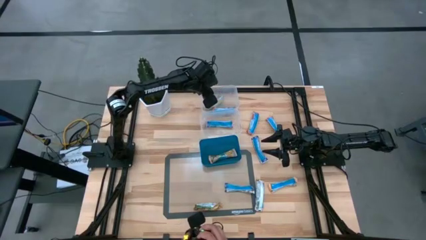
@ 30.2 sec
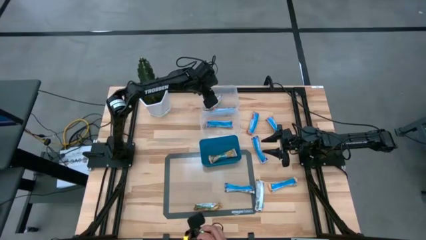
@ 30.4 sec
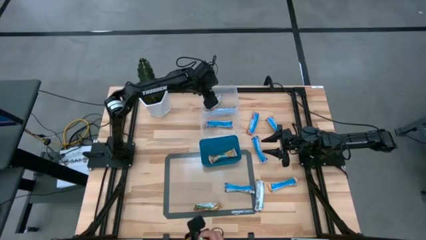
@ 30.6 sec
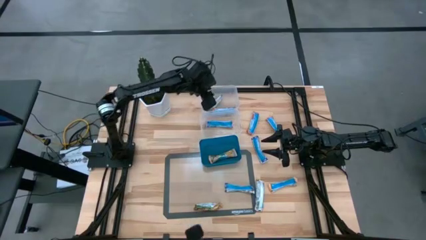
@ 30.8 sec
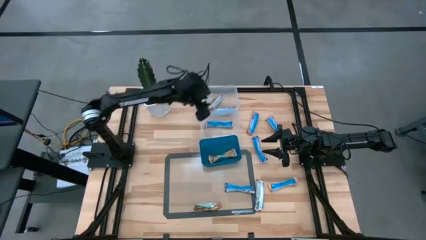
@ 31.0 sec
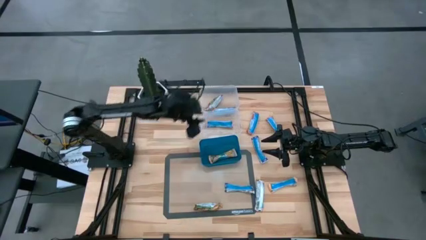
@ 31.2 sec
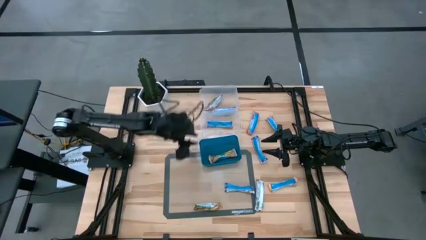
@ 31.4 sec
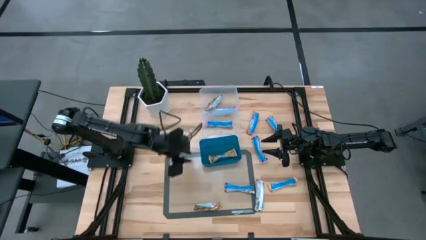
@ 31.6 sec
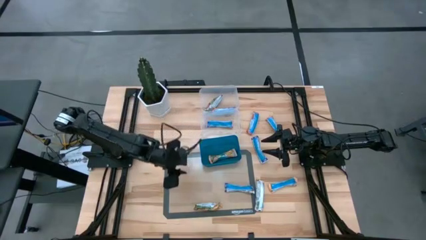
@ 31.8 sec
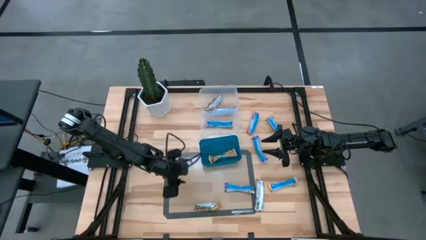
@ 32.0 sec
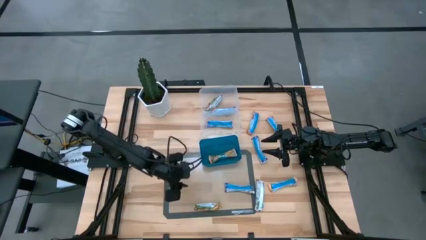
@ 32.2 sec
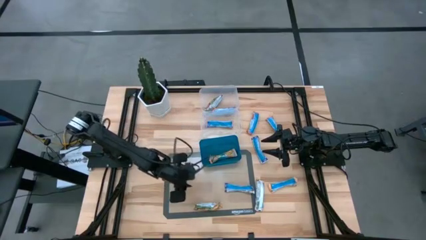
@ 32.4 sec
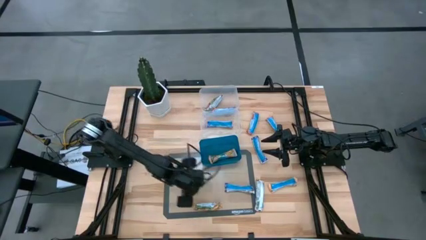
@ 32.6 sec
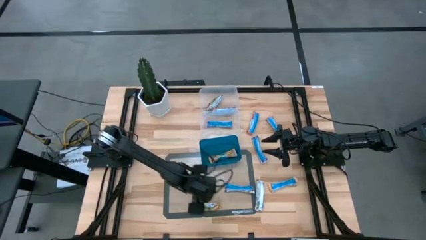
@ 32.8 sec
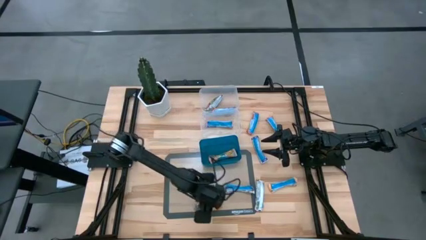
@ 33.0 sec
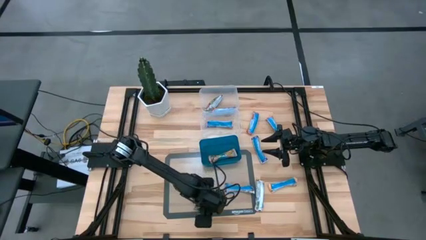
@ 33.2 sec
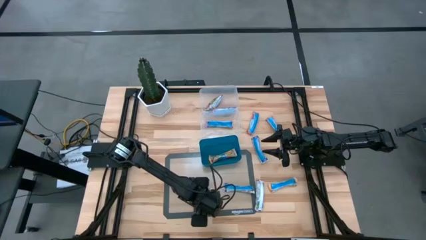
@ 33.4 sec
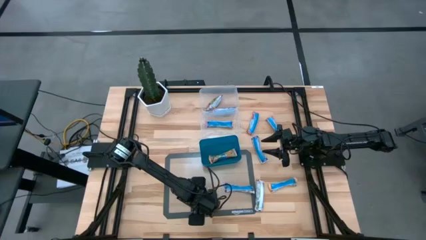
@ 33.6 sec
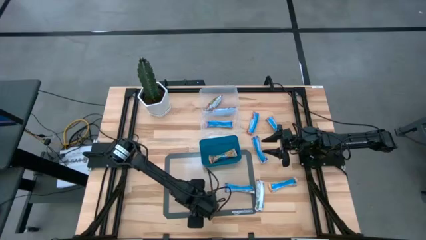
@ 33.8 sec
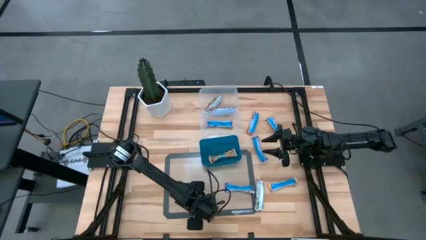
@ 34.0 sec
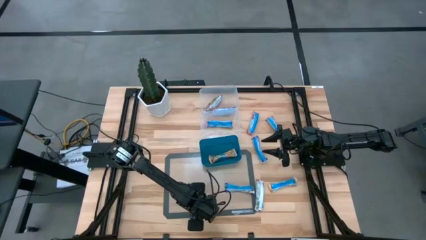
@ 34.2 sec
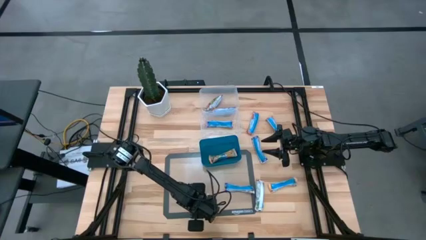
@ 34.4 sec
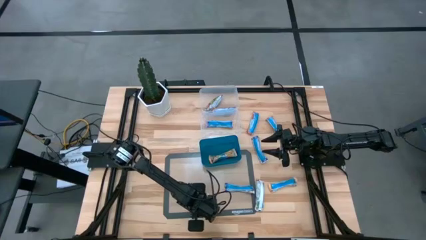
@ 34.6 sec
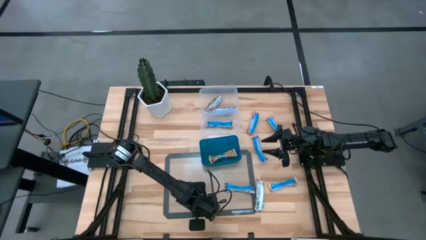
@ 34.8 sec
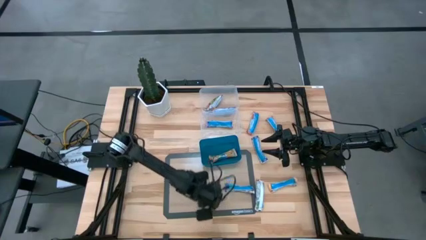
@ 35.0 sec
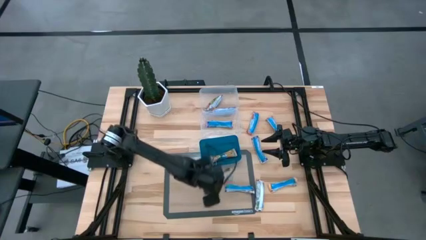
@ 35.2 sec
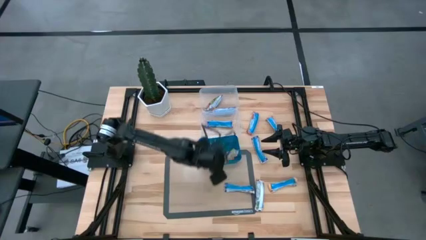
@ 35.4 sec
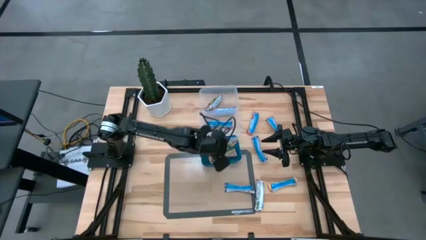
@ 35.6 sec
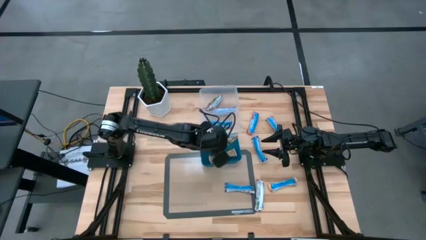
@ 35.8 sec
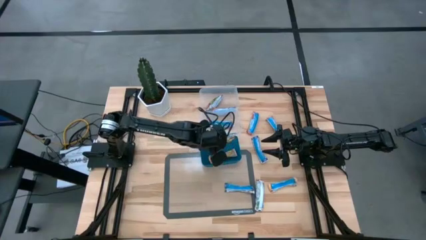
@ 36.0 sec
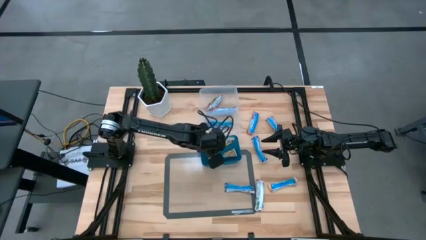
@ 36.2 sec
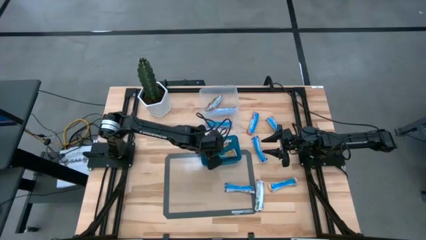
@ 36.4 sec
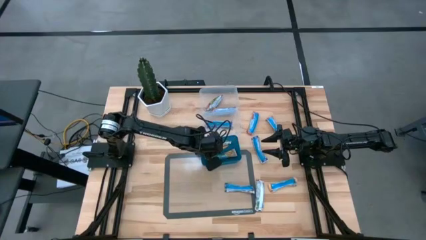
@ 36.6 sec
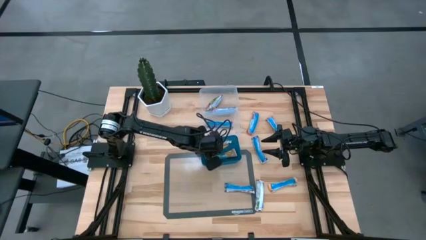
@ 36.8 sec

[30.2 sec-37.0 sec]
Task: Pick and place Granola Bars by type
Put the yellow granola bar into the top transparent bin

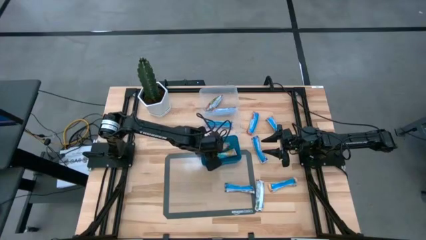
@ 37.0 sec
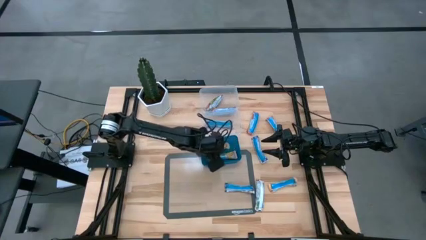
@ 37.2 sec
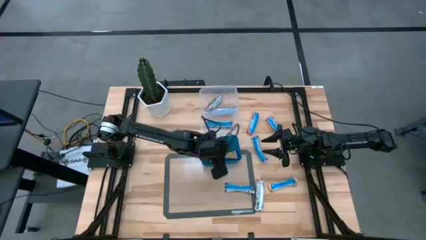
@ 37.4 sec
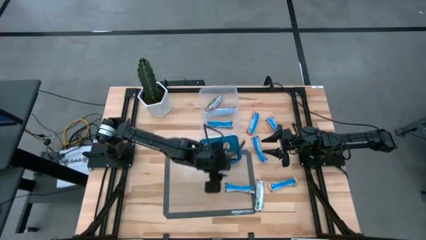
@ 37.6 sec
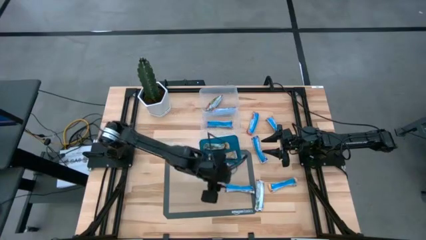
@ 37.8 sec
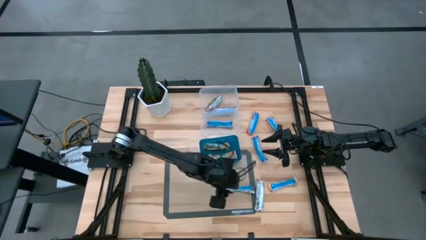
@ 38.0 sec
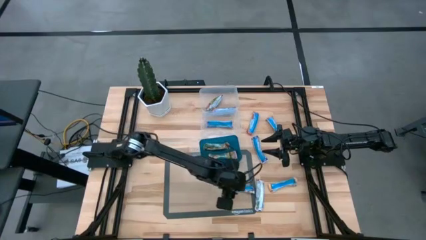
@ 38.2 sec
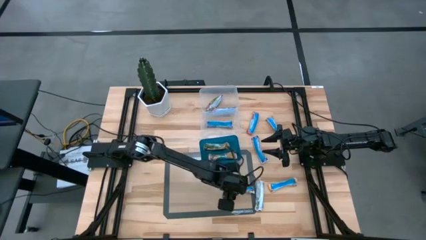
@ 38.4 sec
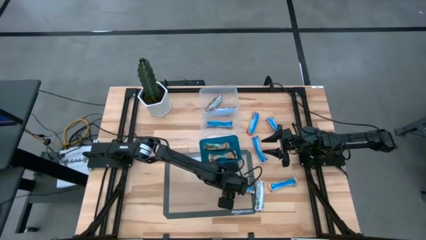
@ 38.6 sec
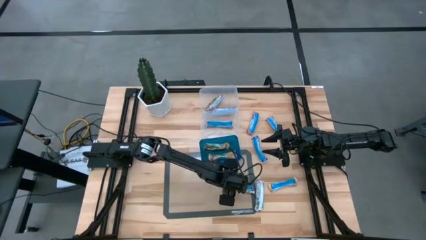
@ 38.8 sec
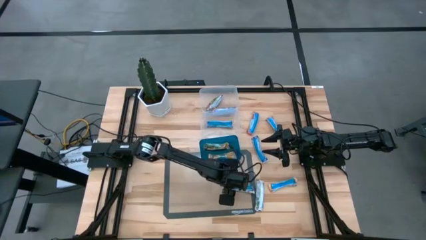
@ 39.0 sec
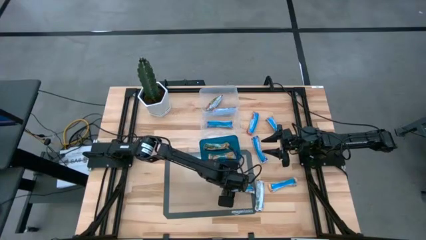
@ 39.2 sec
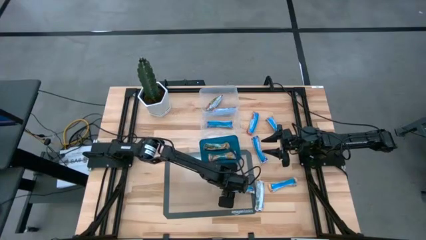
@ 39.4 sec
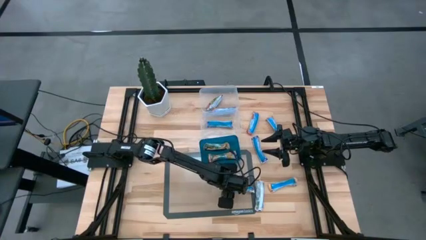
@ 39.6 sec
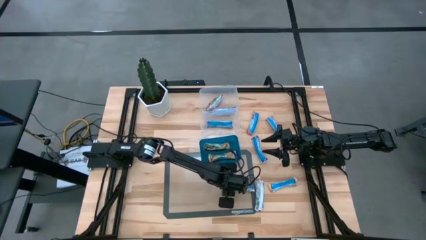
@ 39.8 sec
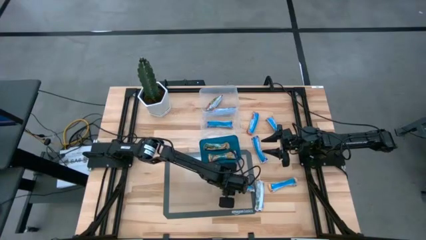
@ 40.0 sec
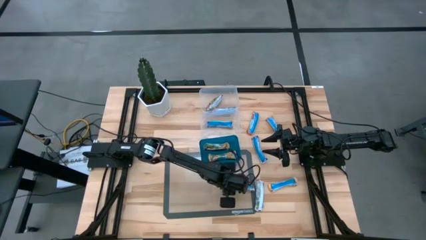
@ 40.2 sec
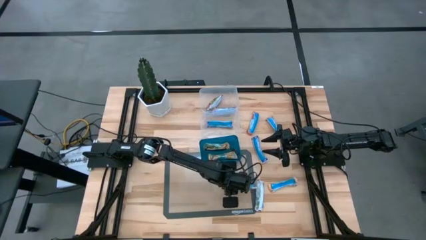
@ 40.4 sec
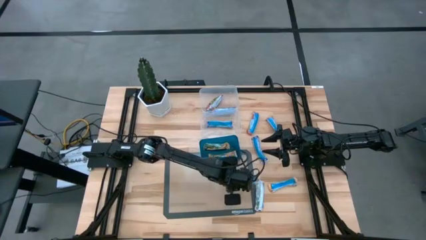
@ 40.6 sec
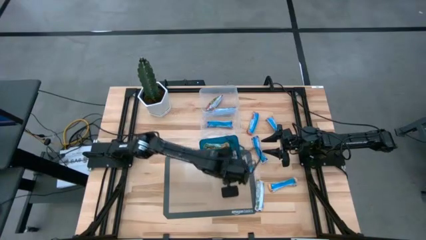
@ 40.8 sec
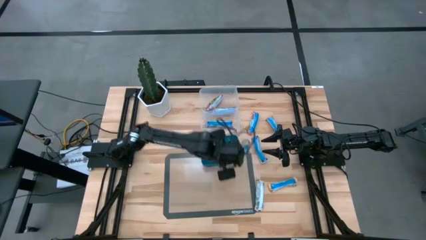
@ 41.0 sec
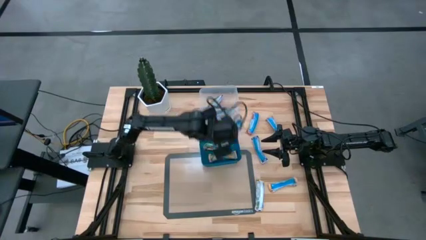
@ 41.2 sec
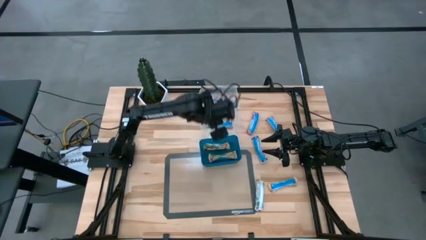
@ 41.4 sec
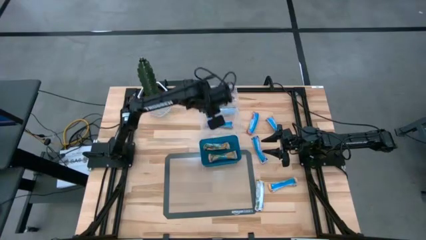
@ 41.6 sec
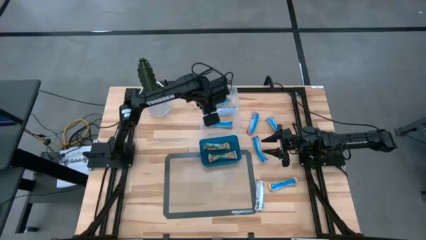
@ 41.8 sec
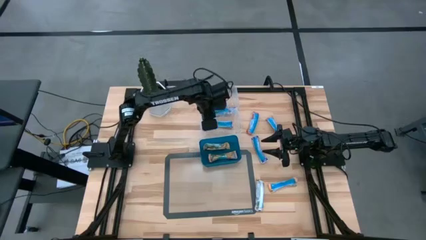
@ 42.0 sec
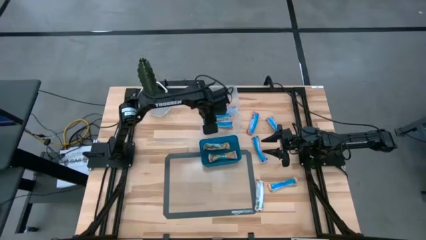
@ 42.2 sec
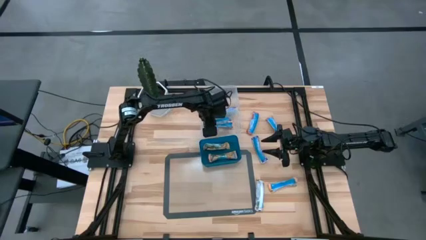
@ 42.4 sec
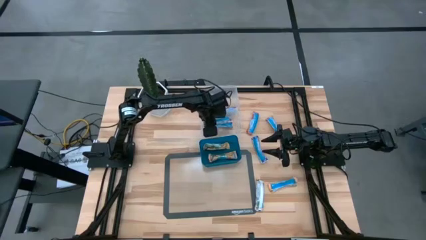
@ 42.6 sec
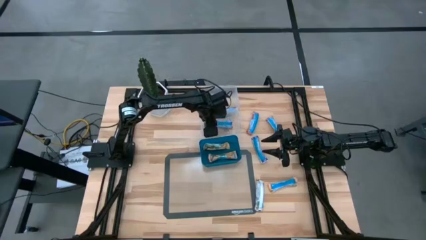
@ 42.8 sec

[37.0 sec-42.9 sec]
Put the blue granola bar into the bottom transparent bin

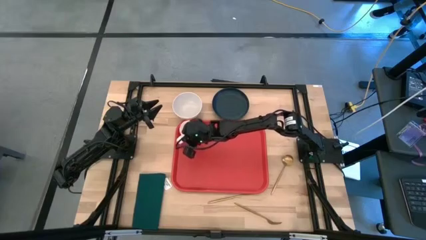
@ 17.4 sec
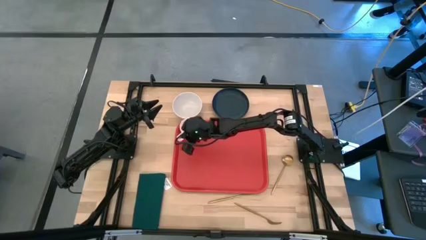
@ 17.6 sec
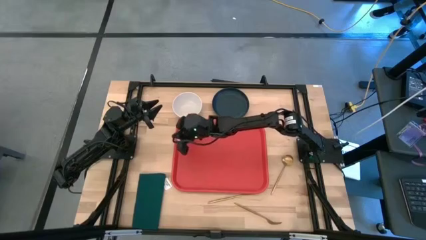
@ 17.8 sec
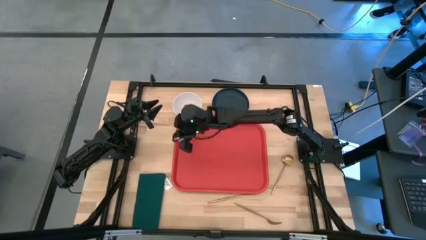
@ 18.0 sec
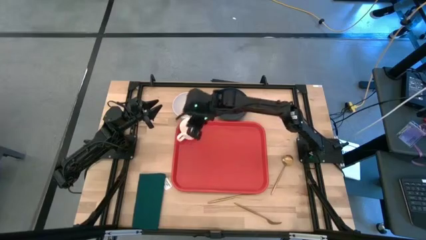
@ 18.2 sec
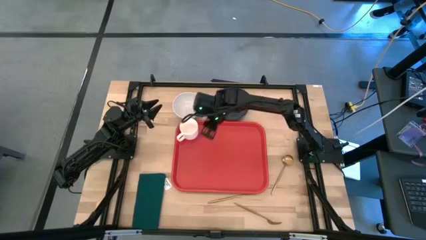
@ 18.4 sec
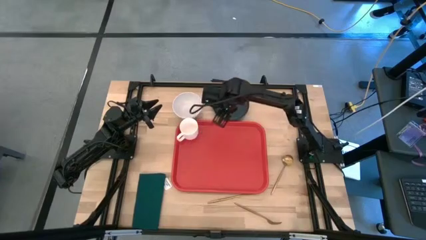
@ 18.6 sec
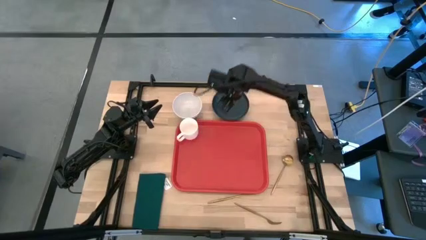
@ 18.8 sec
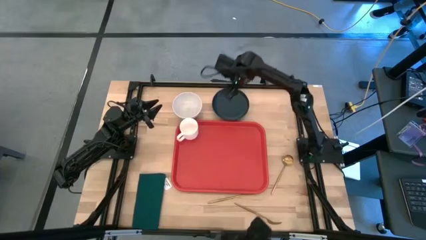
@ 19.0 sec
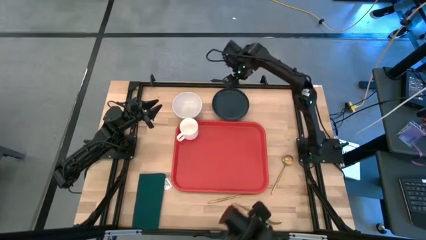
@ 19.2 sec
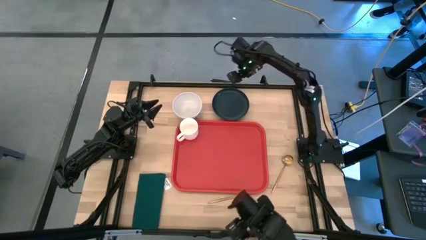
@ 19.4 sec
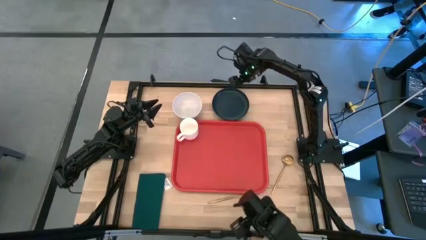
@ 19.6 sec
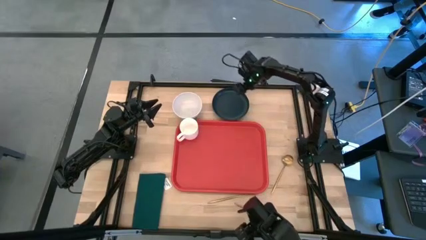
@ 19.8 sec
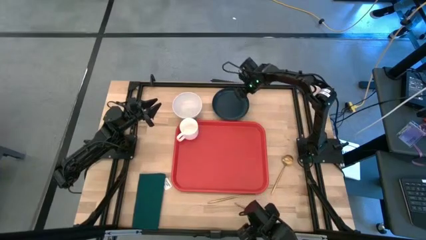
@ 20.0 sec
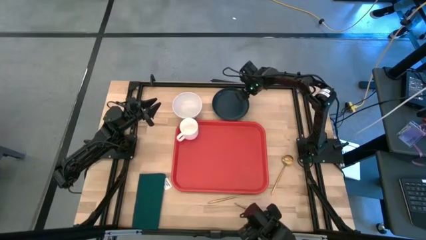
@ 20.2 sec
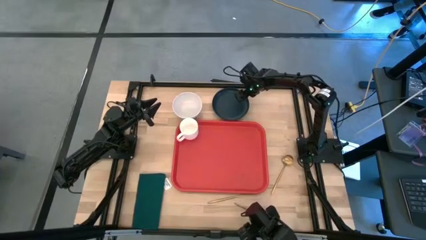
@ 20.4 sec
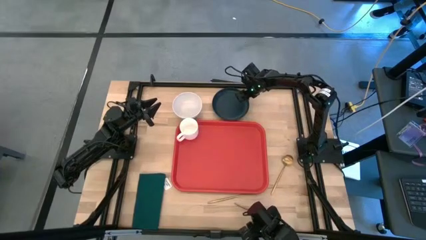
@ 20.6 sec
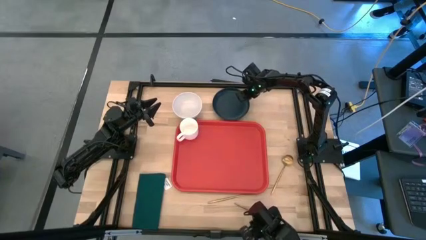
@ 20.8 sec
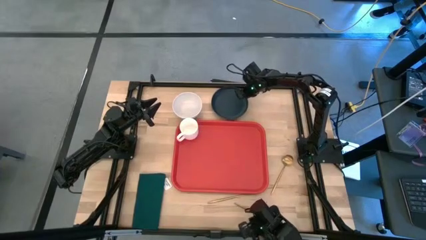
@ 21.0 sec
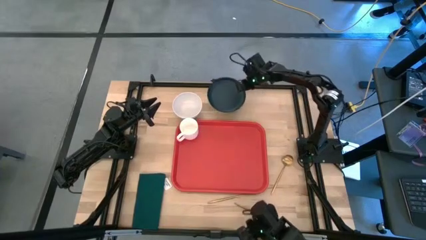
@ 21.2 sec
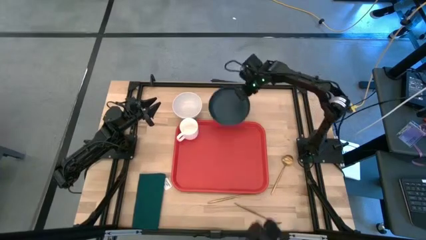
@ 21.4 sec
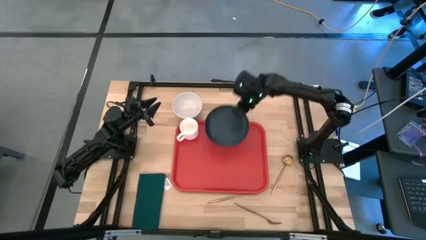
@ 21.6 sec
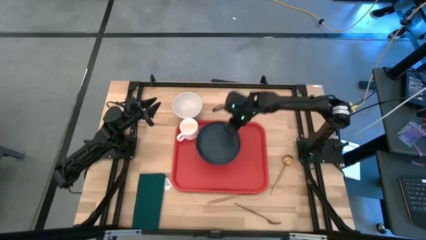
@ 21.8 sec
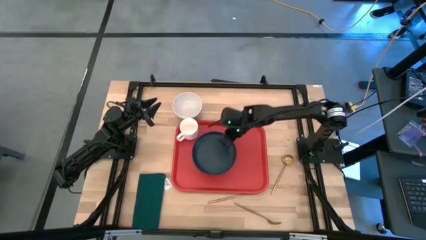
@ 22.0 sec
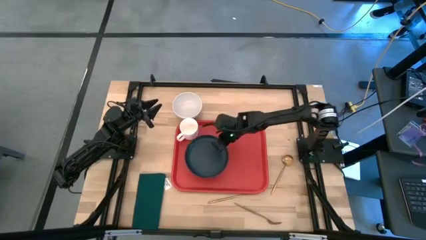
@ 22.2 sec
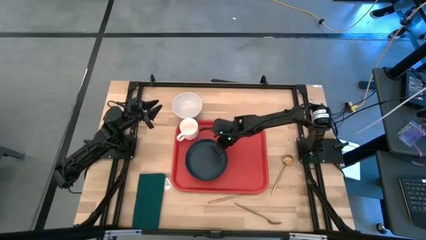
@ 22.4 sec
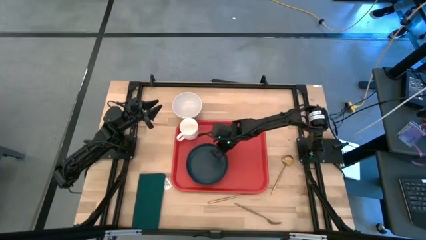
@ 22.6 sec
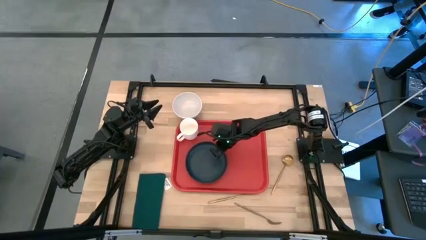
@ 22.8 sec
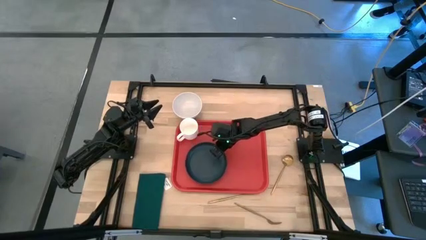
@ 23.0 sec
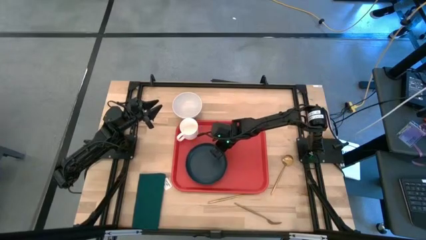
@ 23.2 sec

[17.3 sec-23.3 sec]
Task: Set up tray
Put the black plate under the white mug on the red tray
